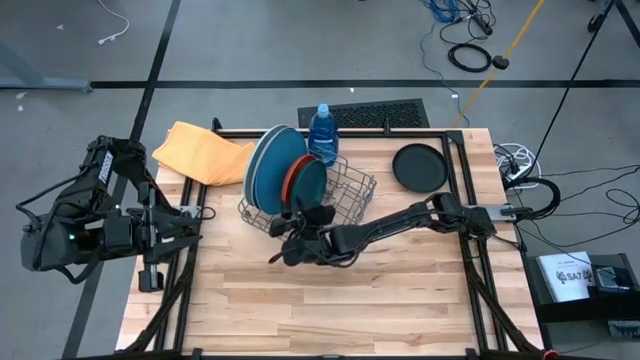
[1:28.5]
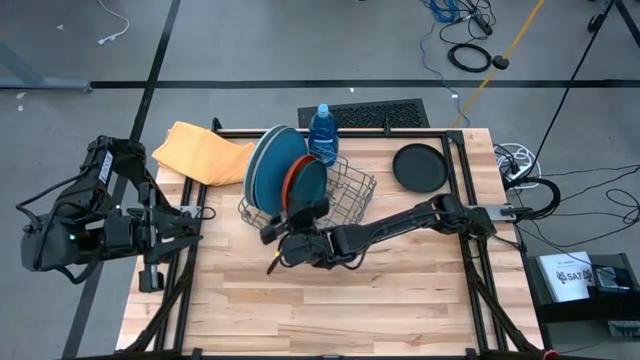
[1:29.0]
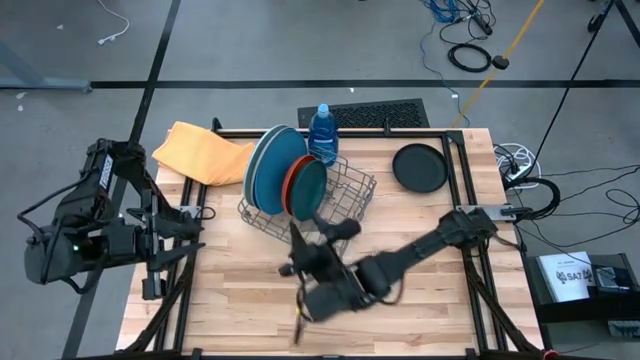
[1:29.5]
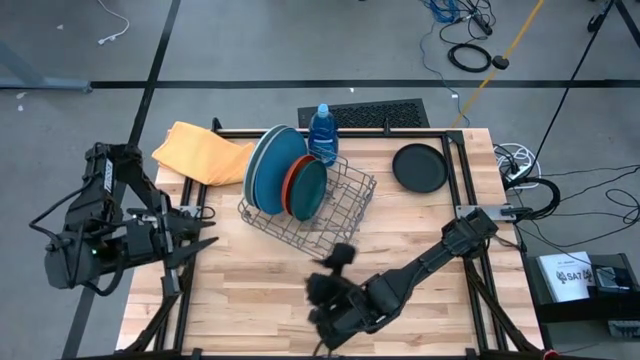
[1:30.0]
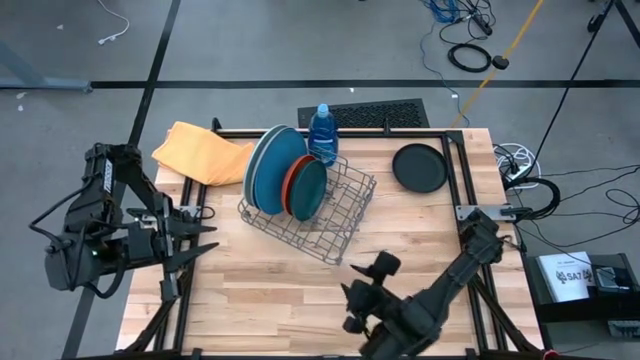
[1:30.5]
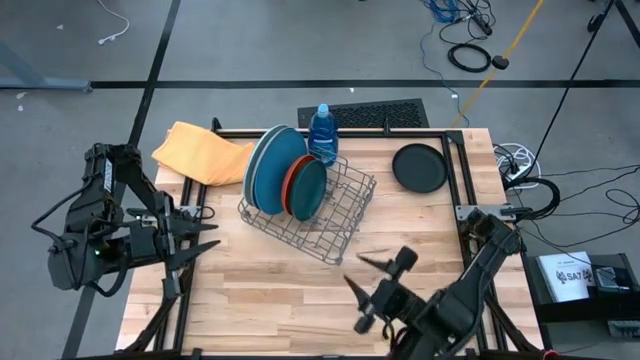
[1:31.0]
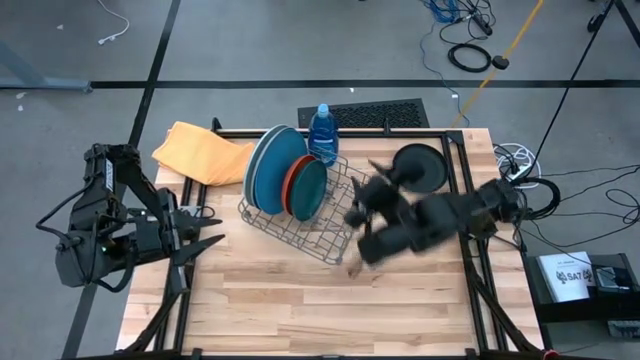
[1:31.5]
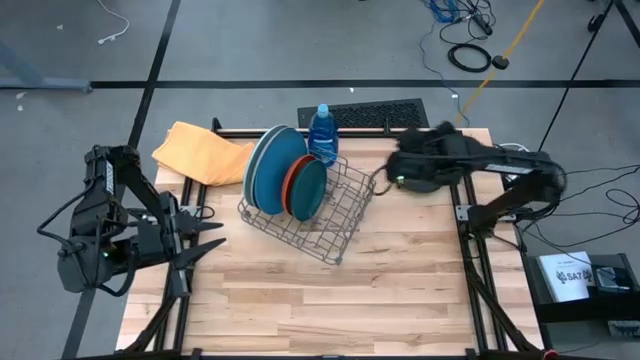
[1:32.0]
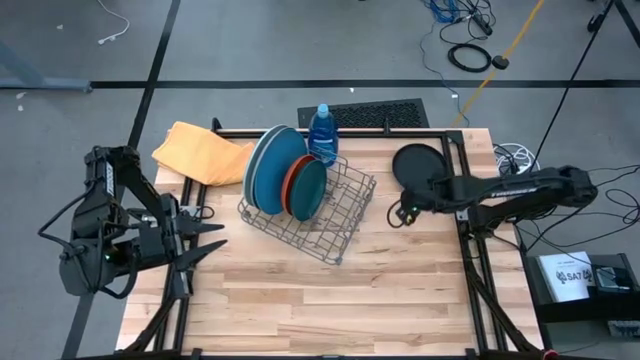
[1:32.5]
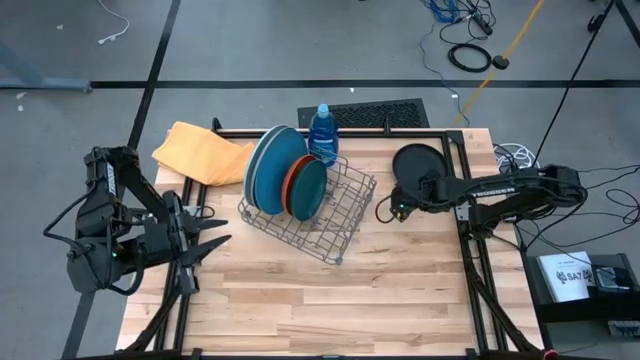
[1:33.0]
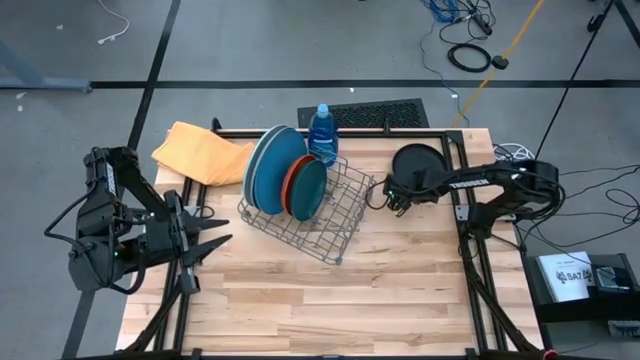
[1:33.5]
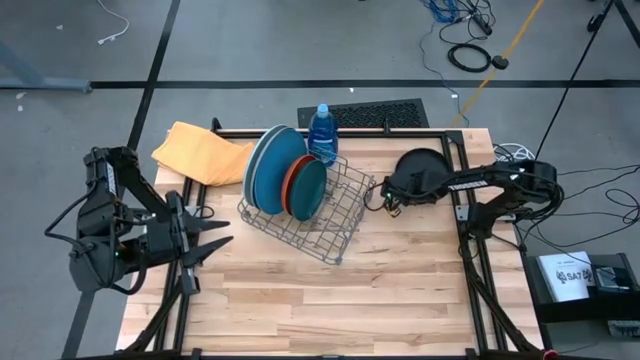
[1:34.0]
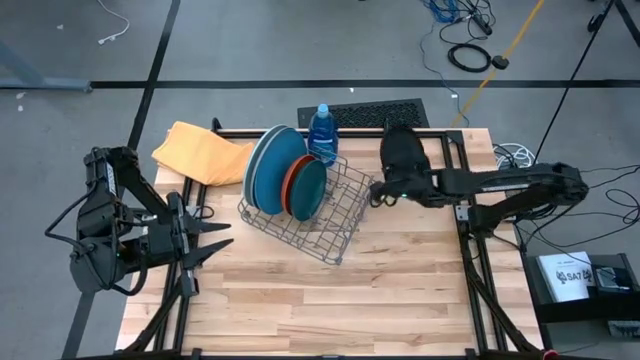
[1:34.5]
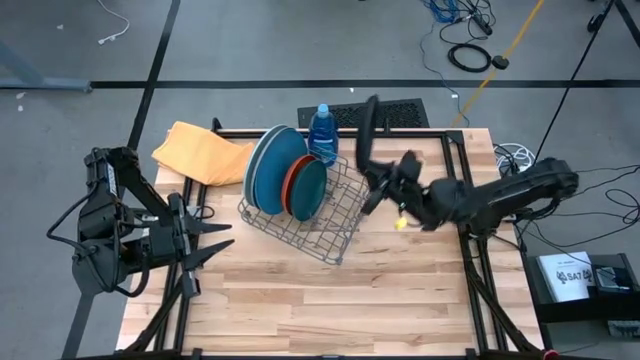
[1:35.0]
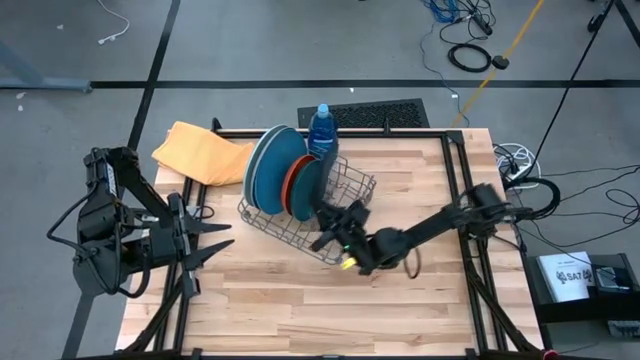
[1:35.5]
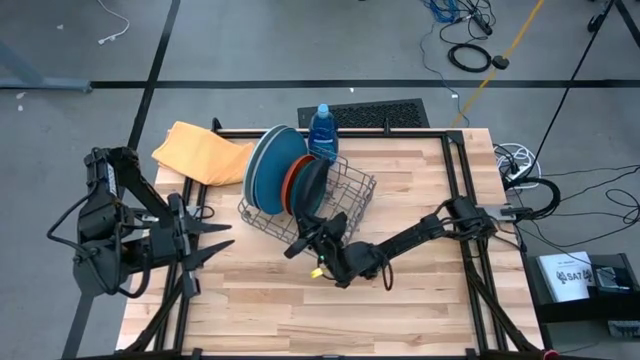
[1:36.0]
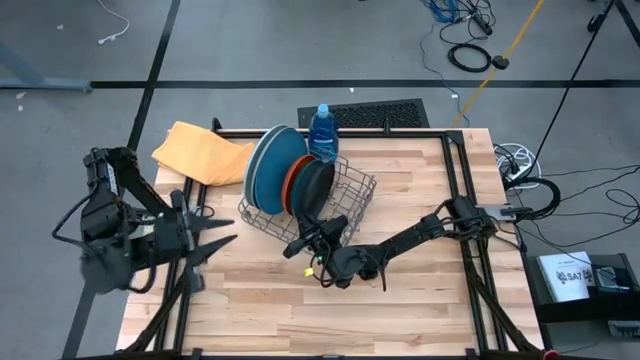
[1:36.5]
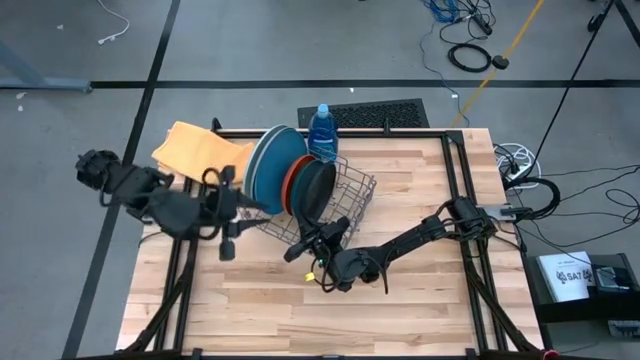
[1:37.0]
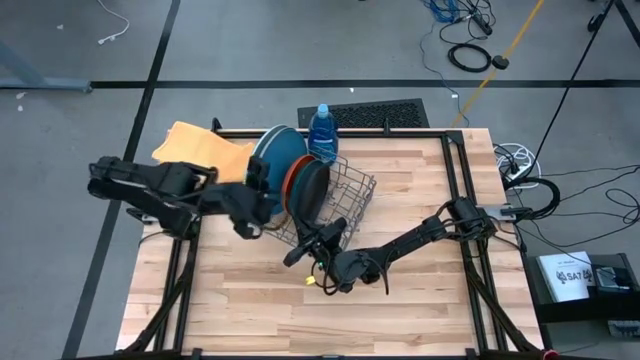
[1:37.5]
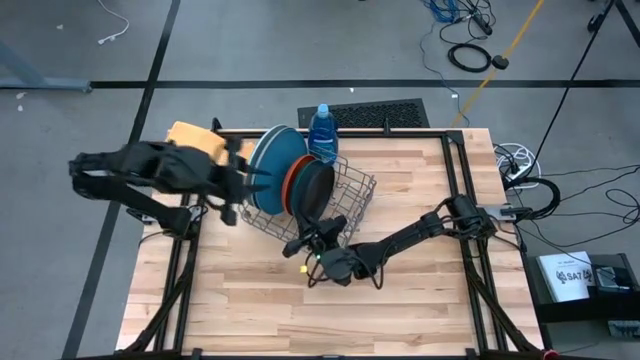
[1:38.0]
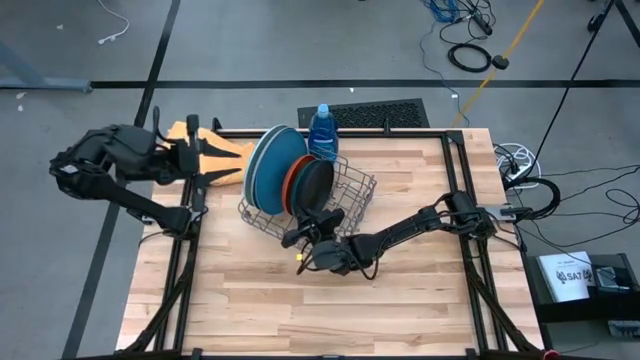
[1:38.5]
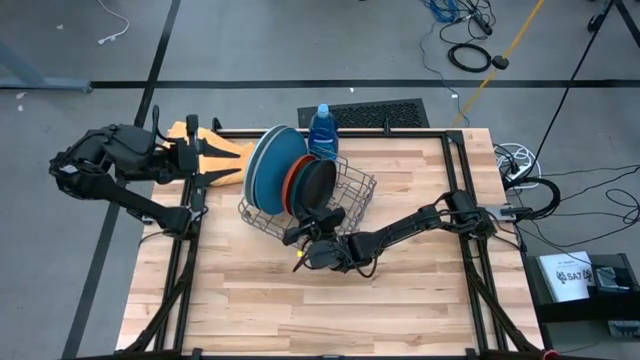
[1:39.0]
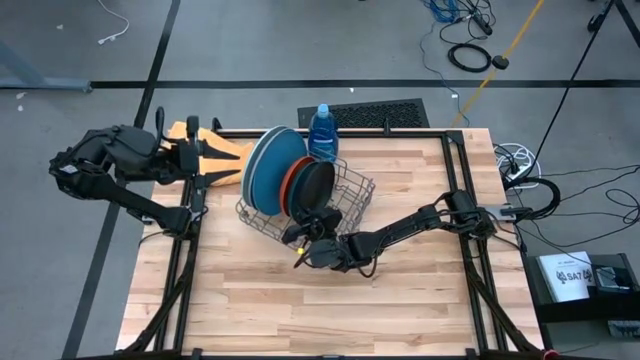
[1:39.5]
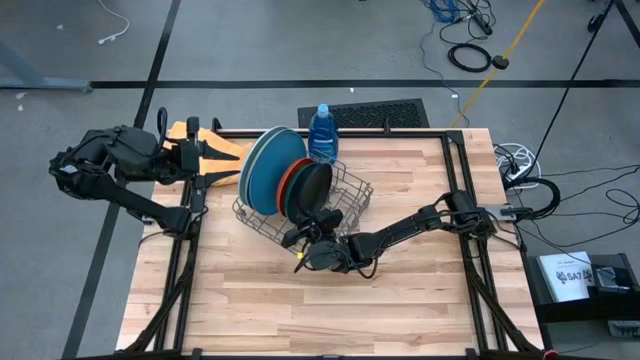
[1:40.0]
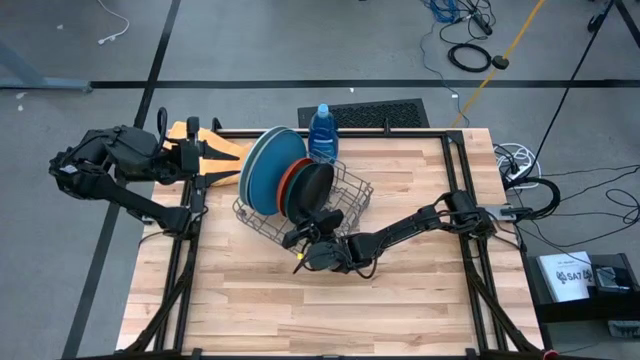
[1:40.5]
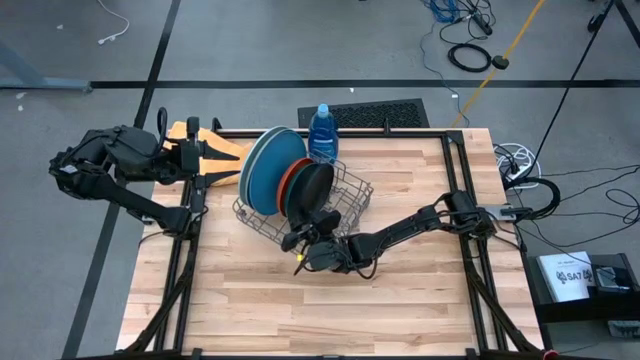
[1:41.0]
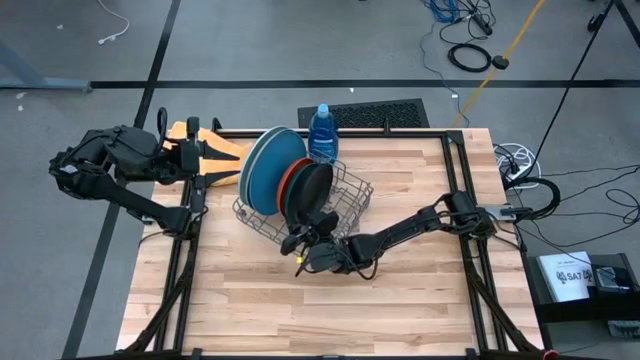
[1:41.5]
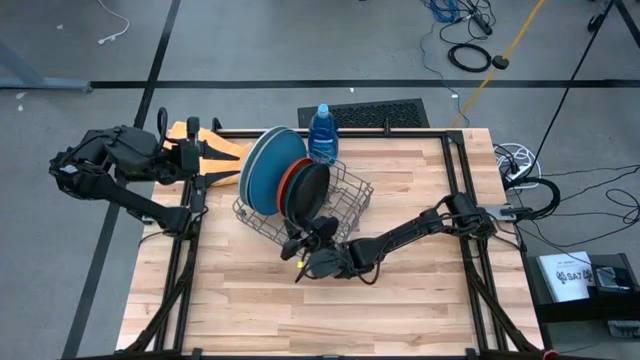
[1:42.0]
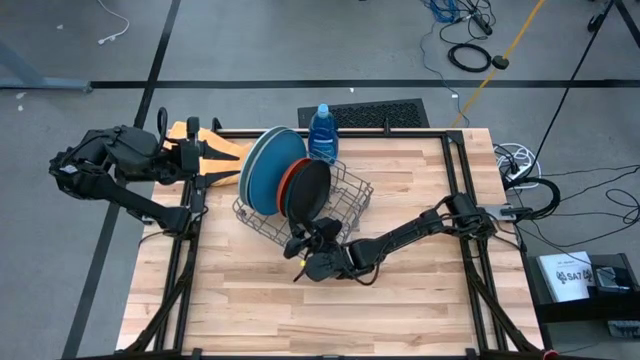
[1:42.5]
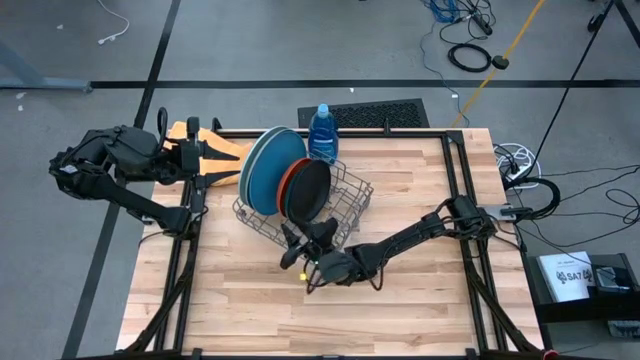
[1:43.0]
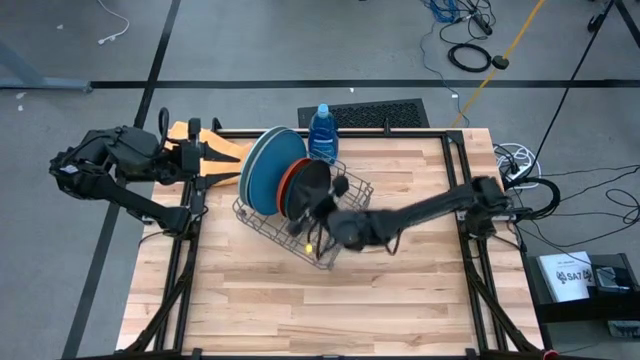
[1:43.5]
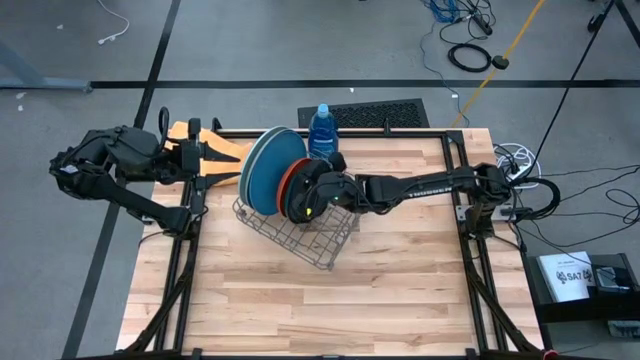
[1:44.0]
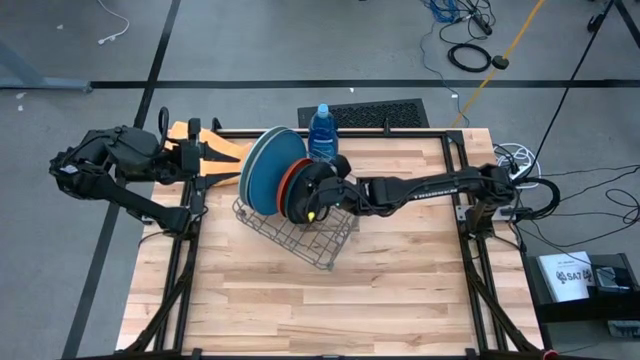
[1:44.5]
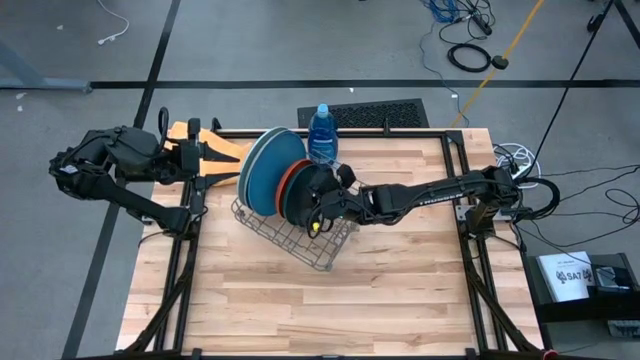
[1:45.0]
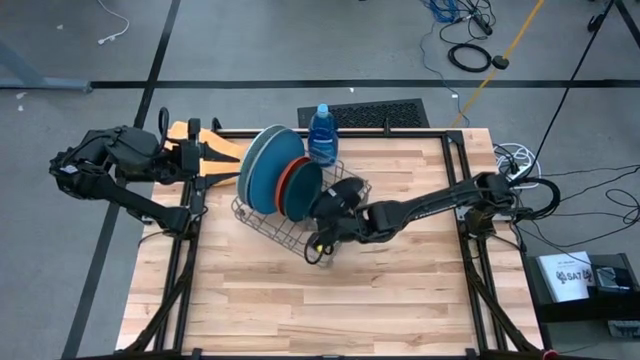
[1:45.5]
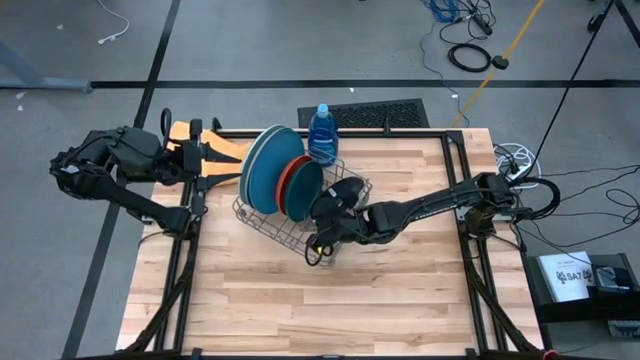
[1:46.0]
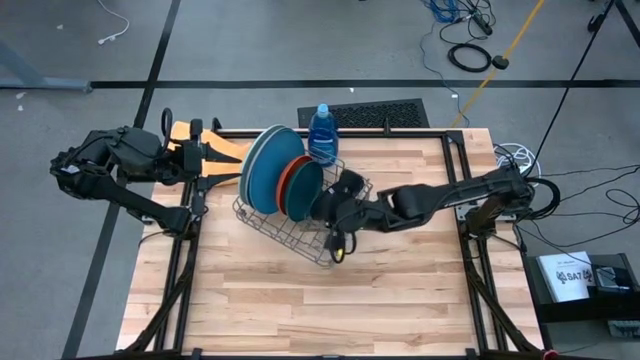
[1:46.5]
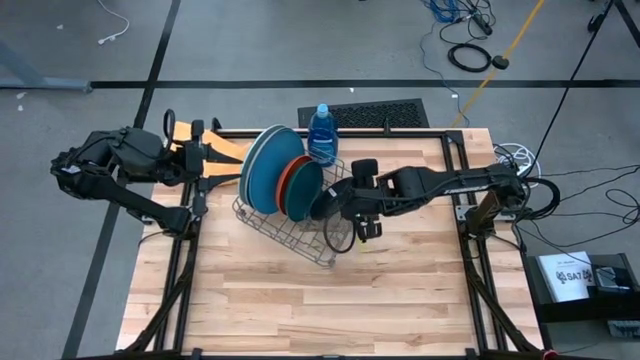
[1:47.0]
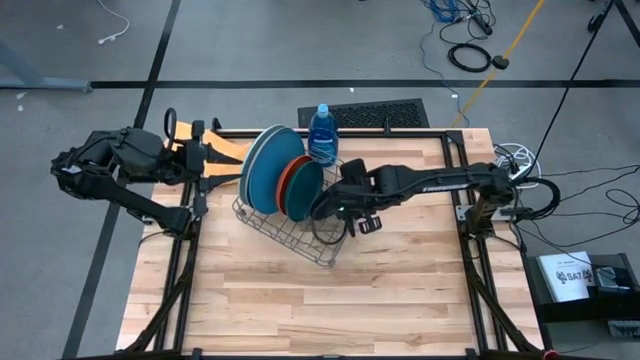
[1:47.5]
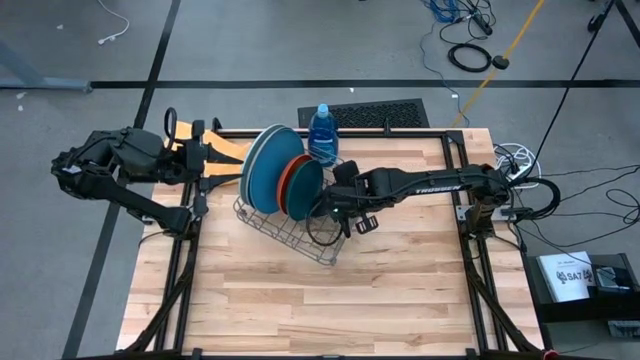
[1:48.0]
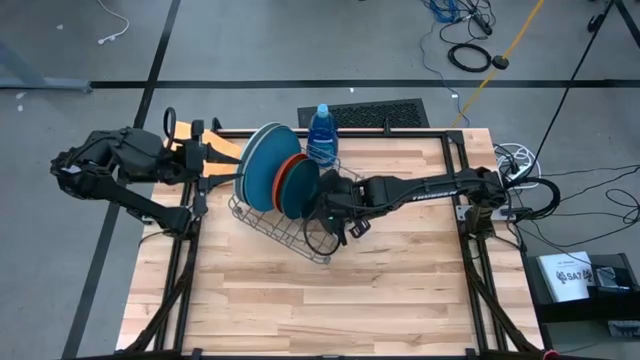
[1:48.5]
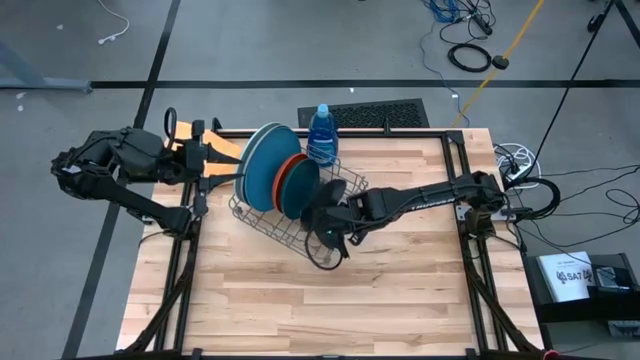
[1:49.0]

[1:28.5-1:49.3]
Task: Sort dishes
Put the black plate into the dish rack
